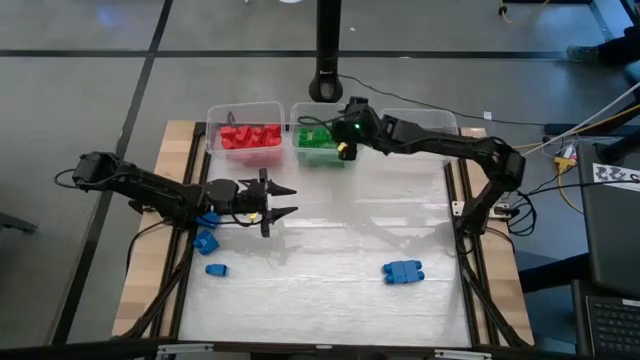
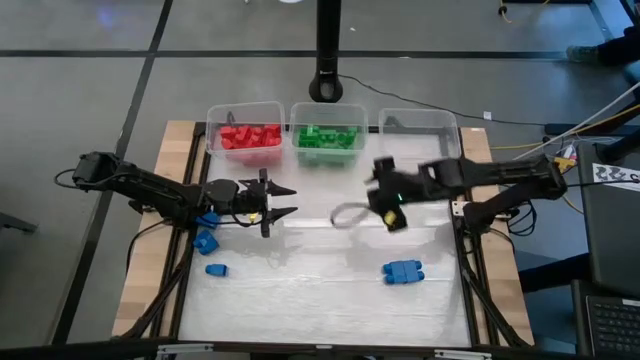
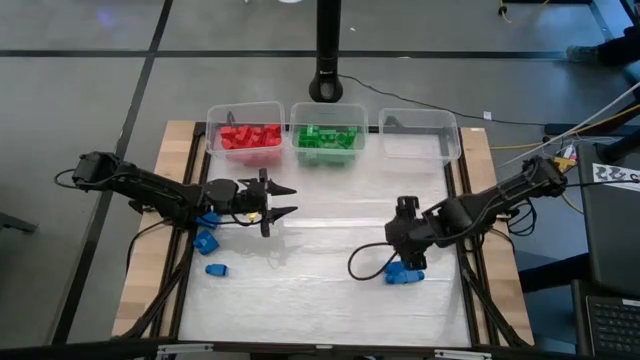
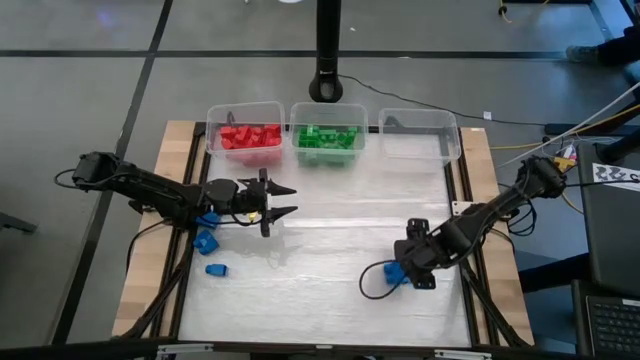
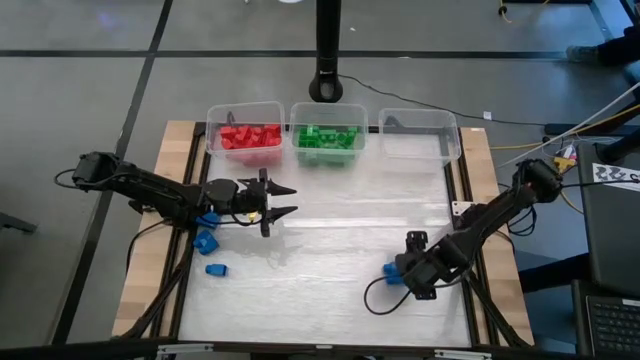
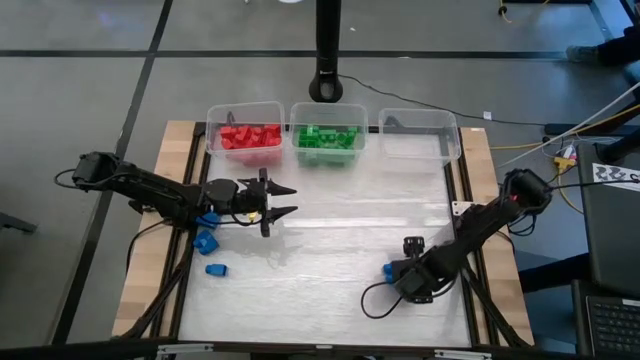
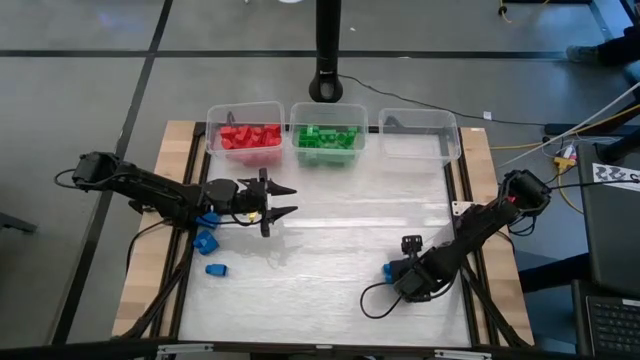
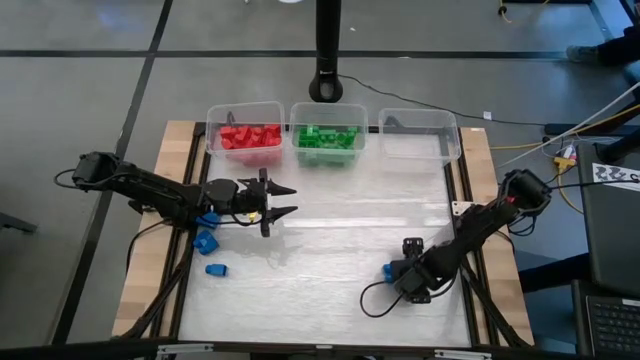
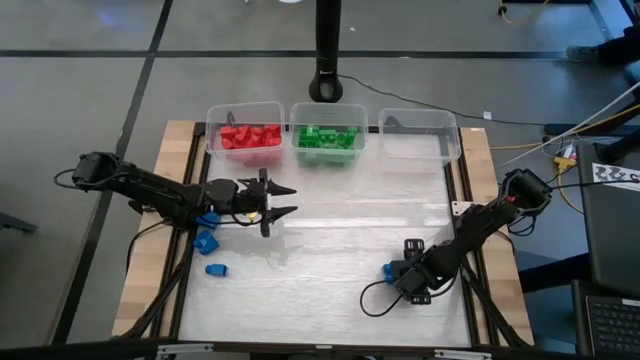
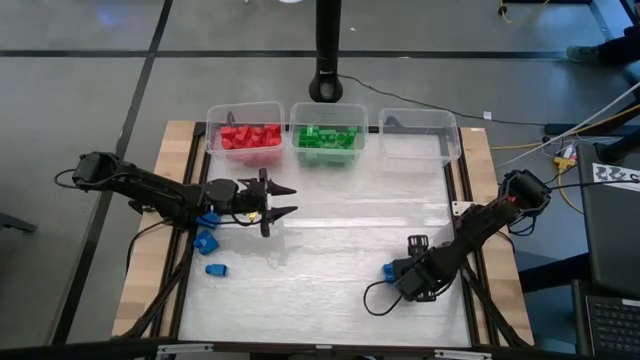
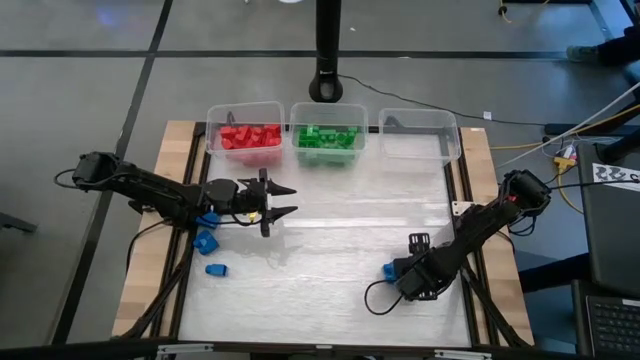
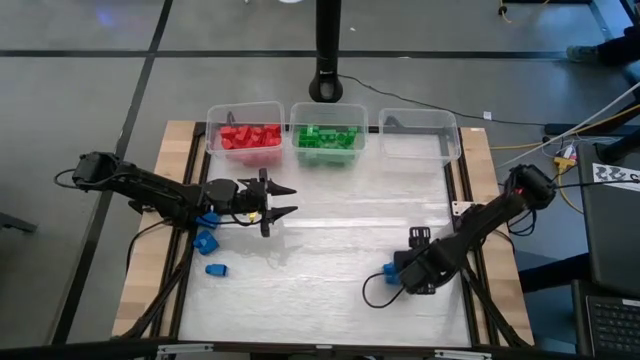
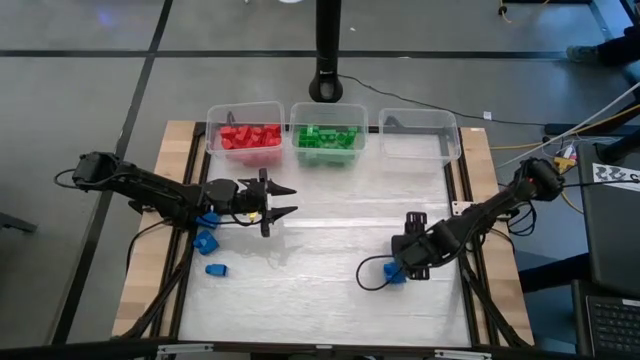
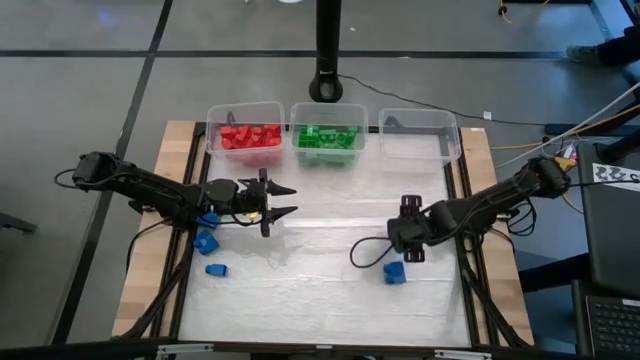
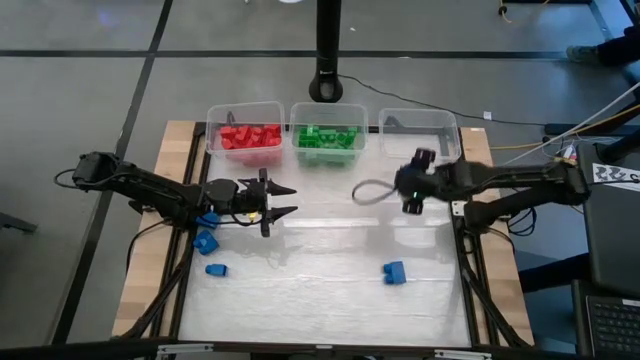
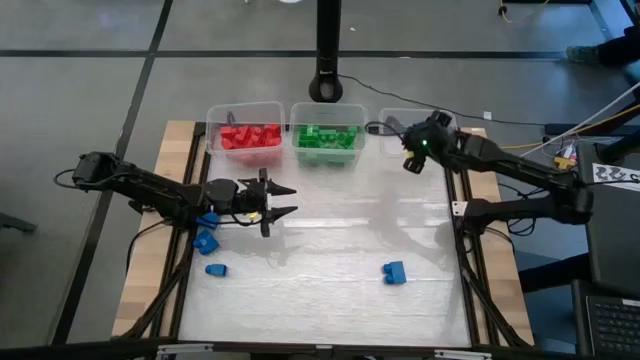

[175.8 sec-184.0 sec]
Task: Sort blocks
Put the blue game piece into the right transparent bin

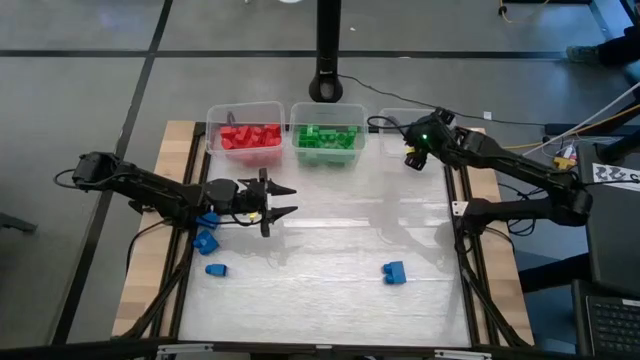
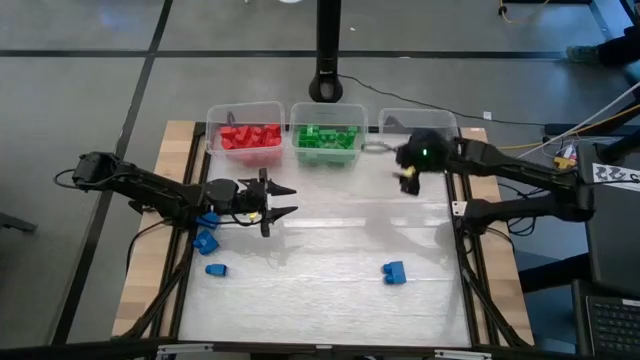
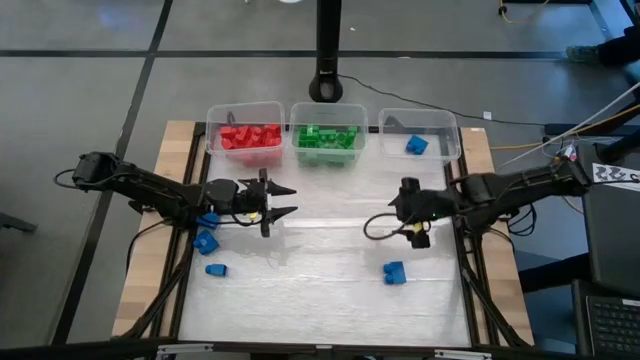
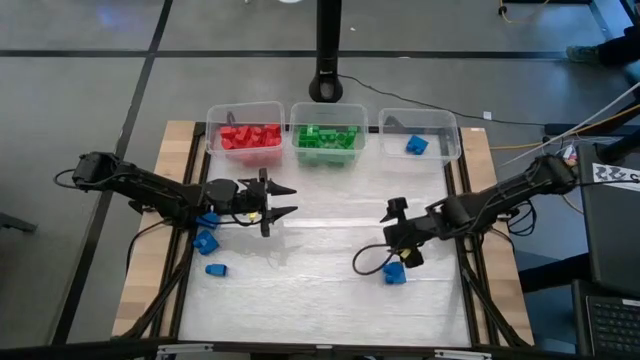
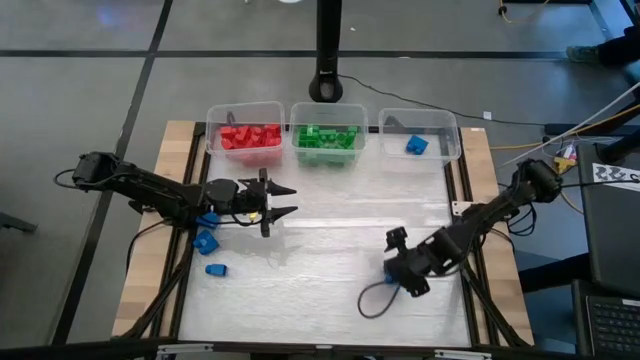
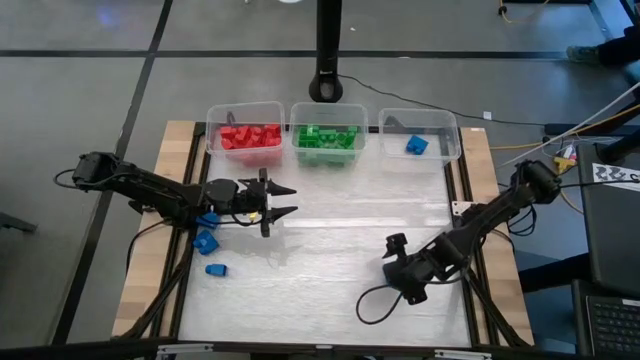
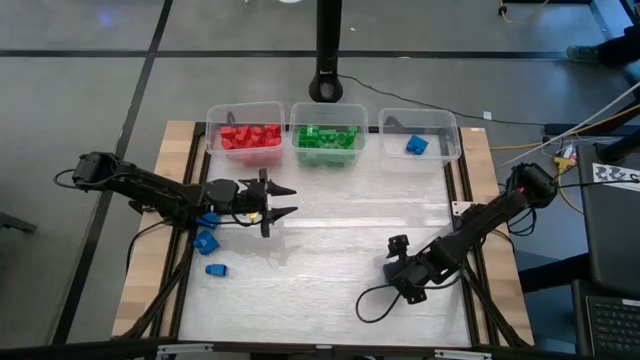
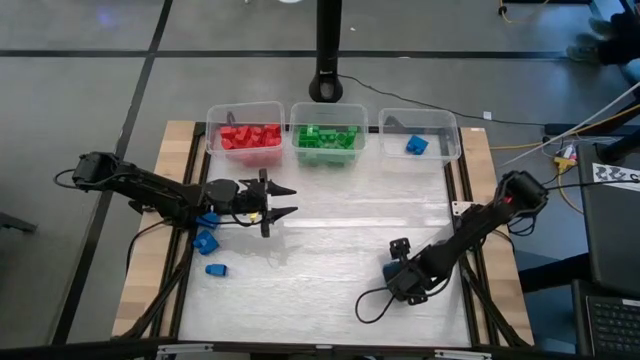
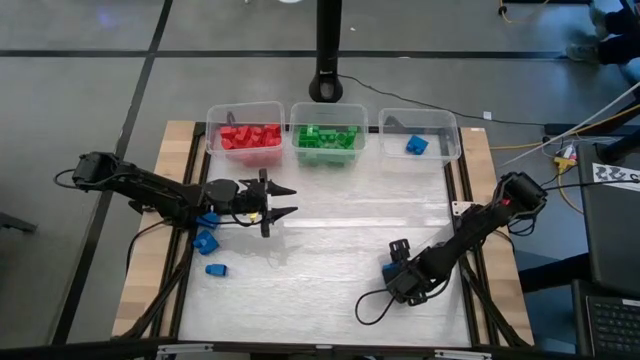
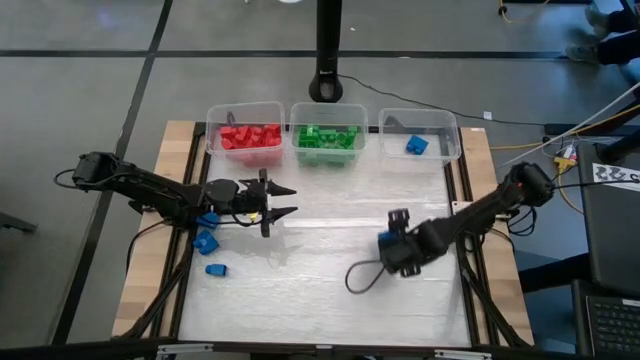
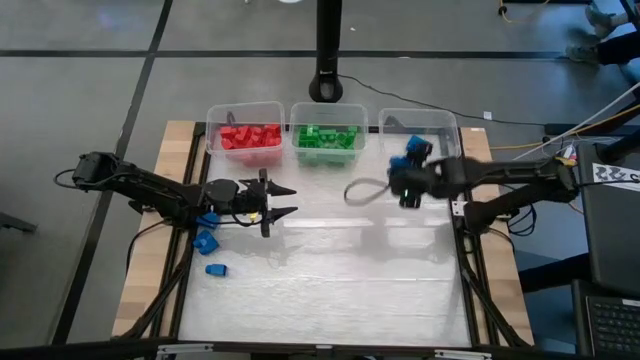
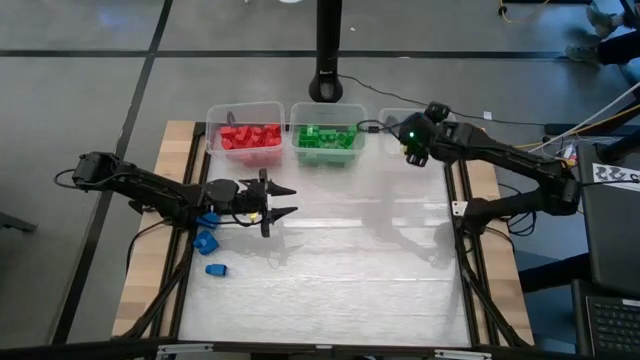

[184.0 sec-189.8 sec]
Put the blue game piece into the right transparent bin

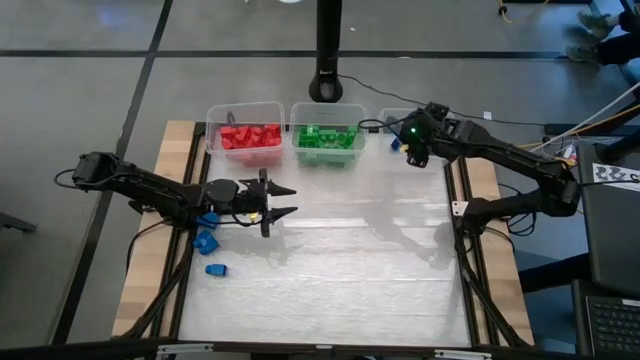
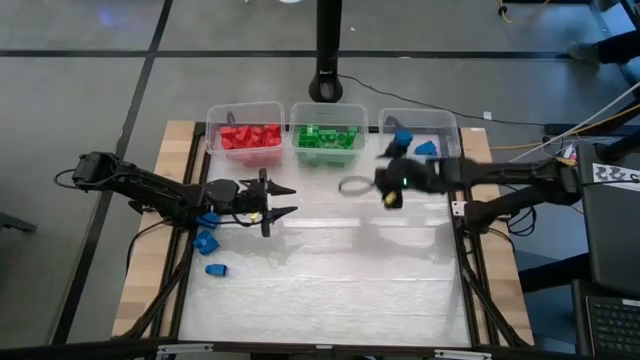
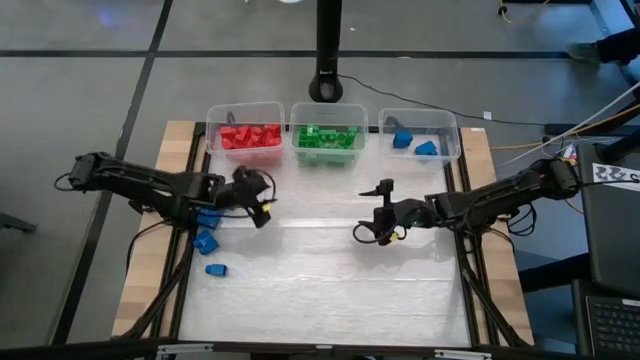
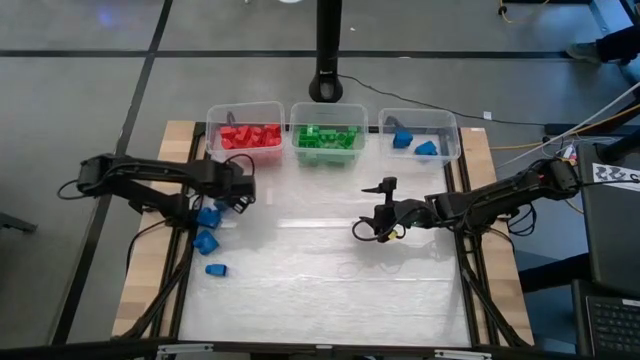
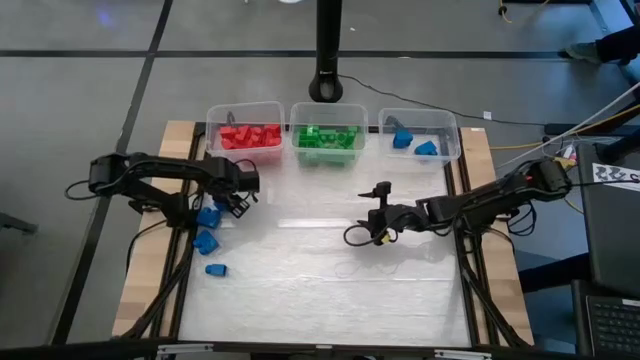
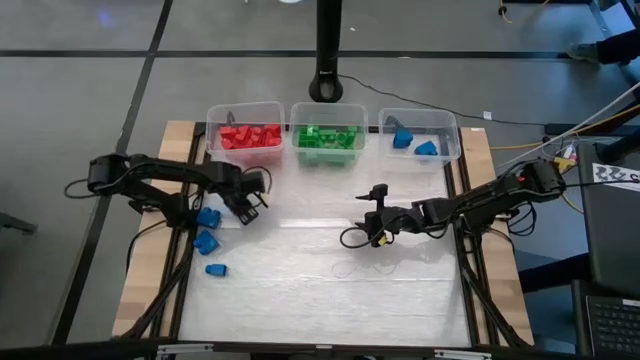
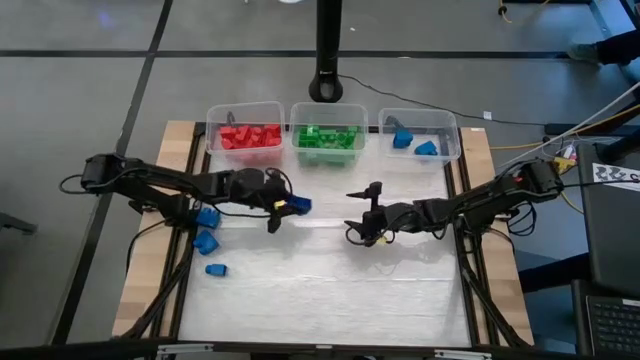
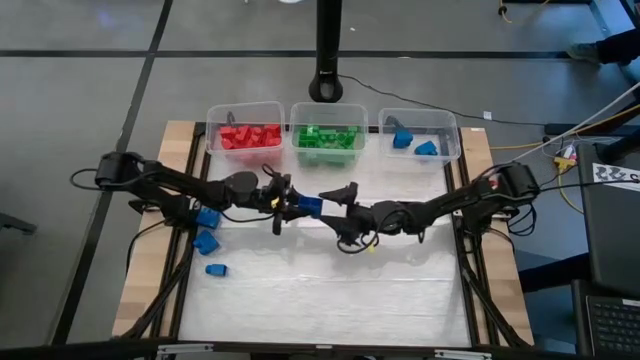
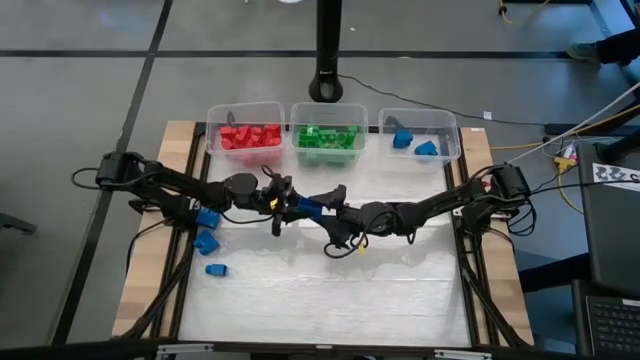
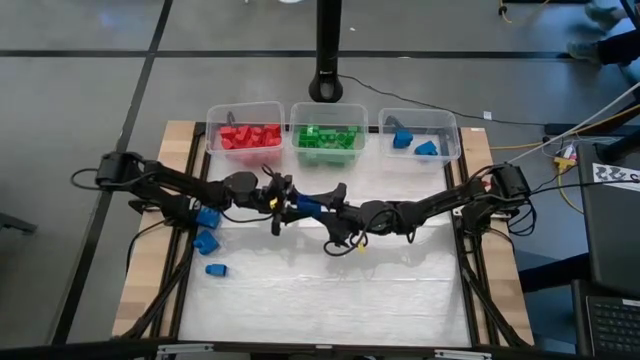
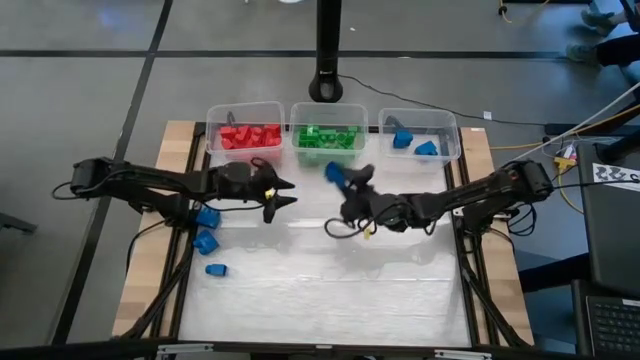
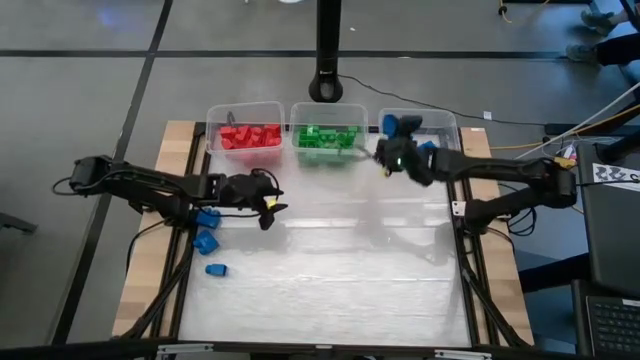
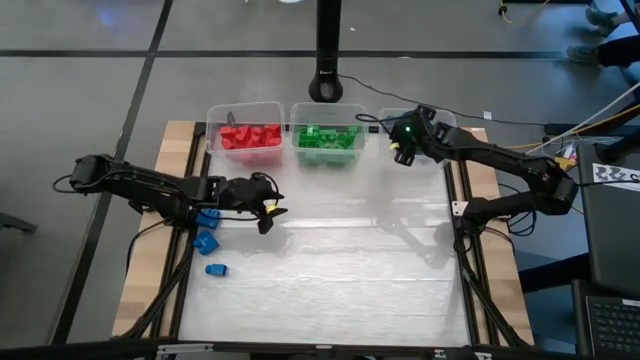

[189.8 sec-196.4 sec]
Put the blue game piece into the right transparent bin
